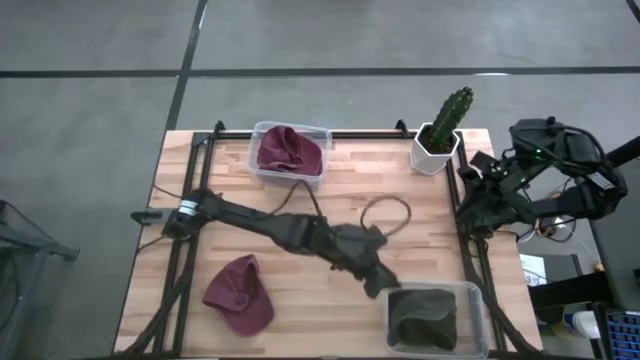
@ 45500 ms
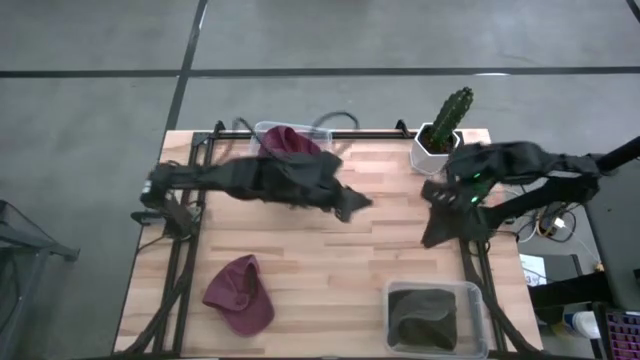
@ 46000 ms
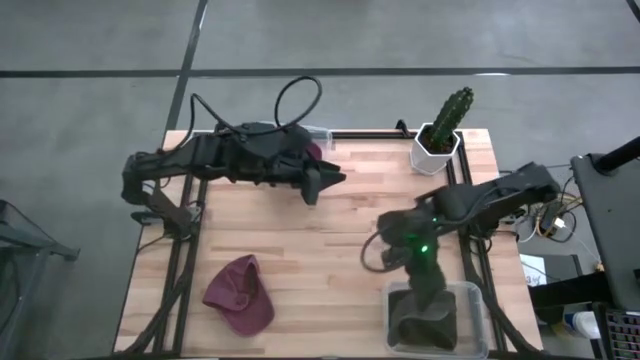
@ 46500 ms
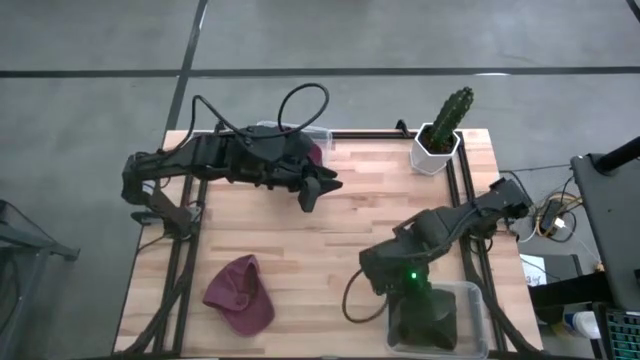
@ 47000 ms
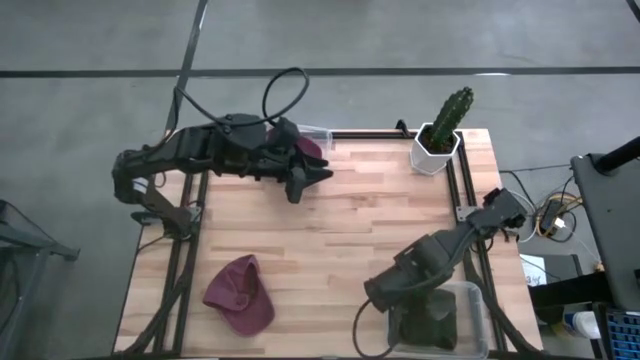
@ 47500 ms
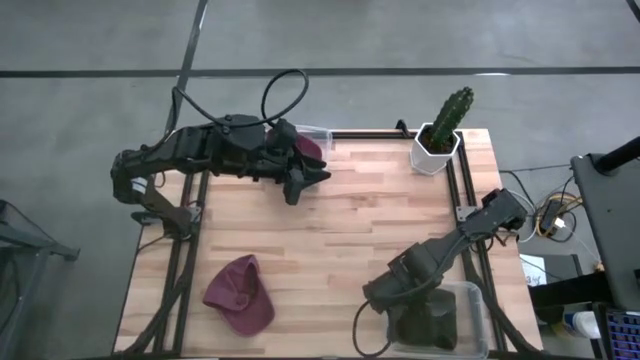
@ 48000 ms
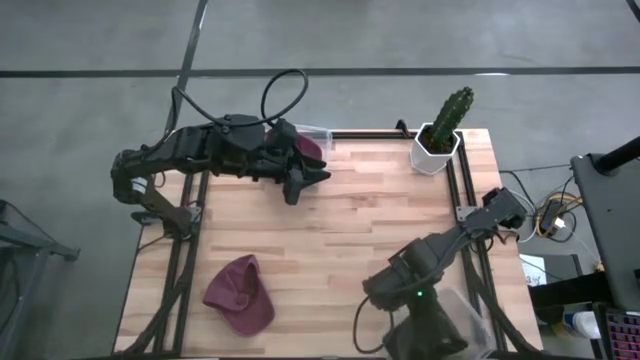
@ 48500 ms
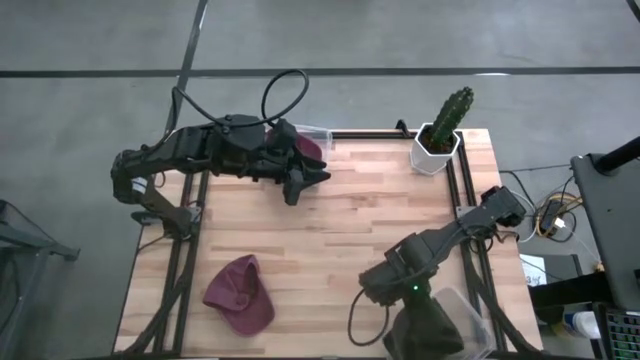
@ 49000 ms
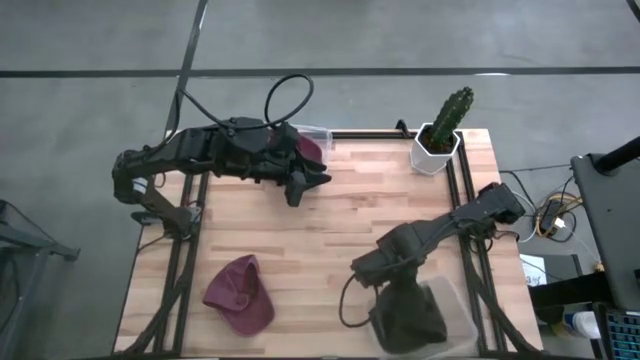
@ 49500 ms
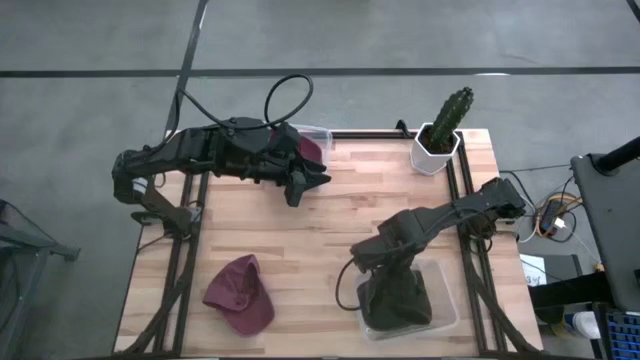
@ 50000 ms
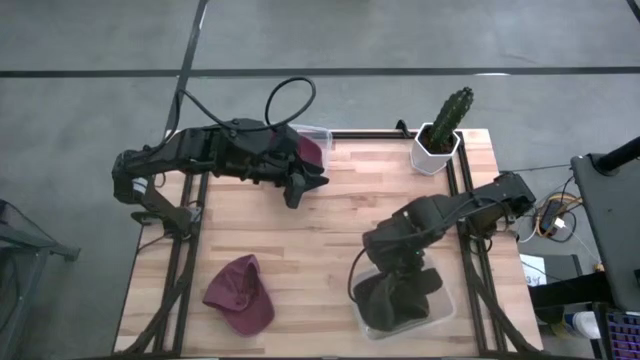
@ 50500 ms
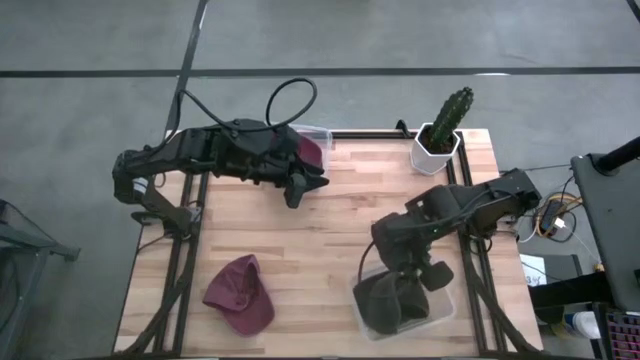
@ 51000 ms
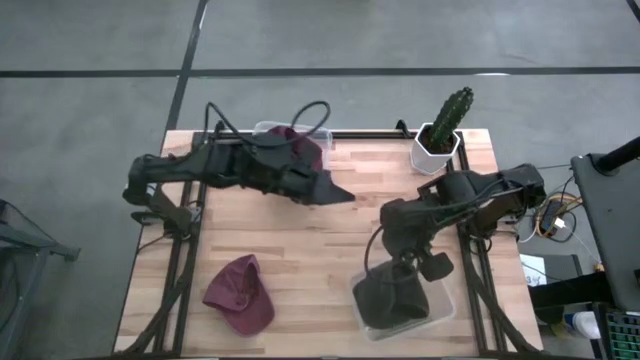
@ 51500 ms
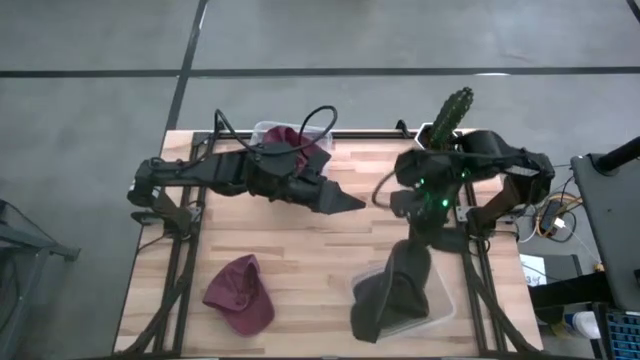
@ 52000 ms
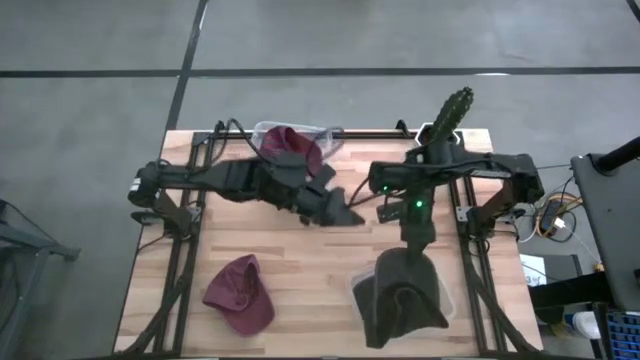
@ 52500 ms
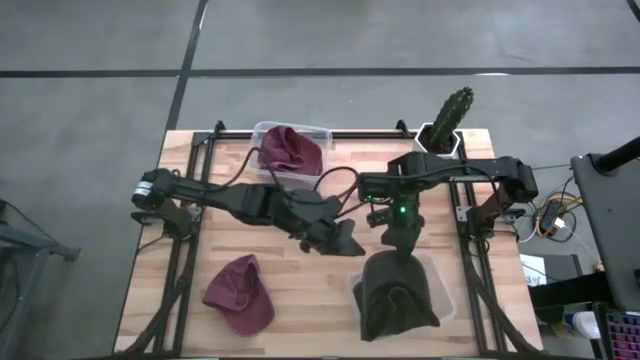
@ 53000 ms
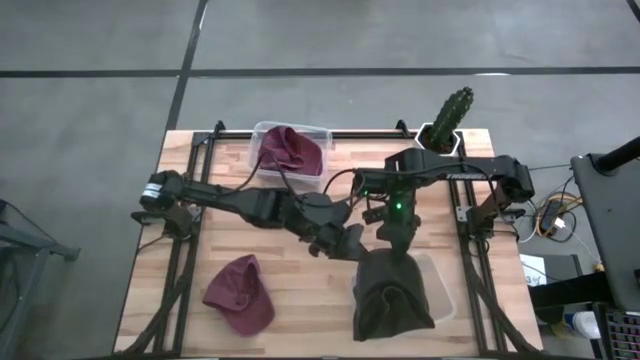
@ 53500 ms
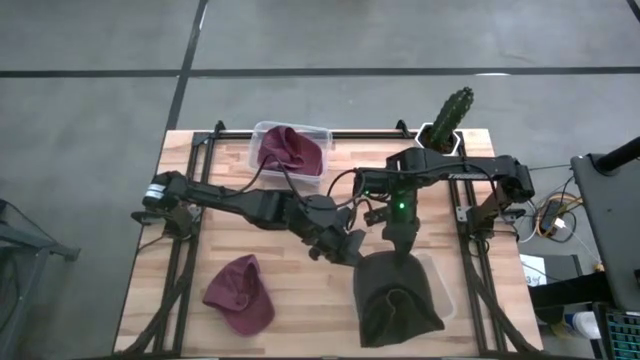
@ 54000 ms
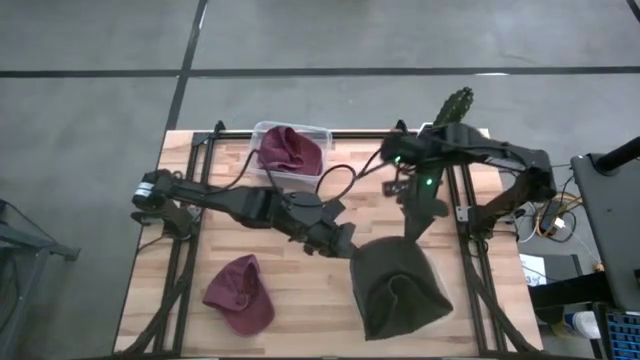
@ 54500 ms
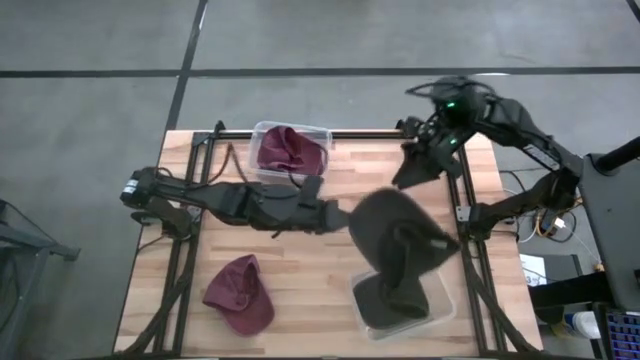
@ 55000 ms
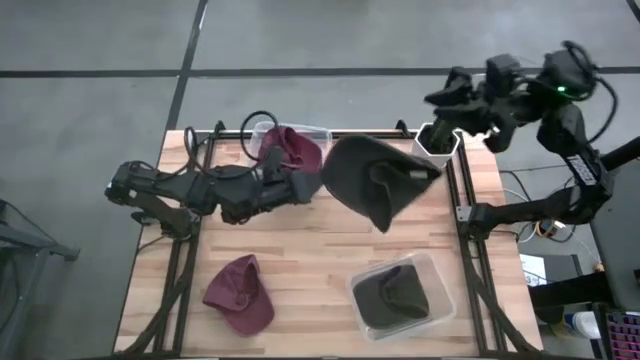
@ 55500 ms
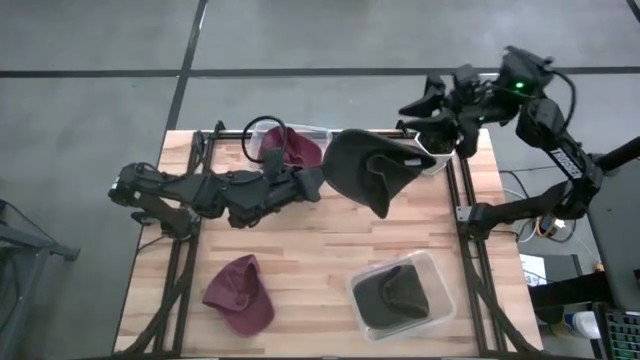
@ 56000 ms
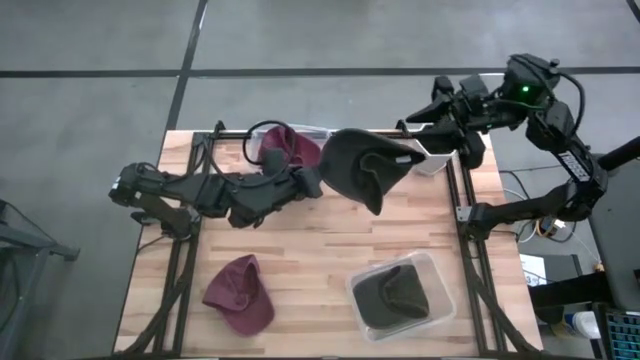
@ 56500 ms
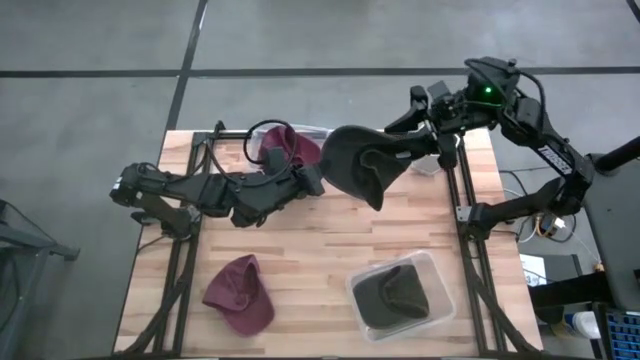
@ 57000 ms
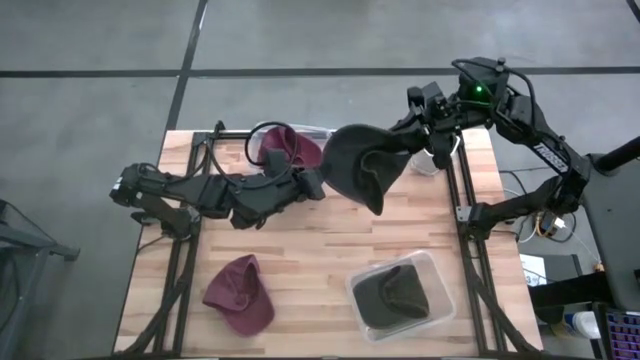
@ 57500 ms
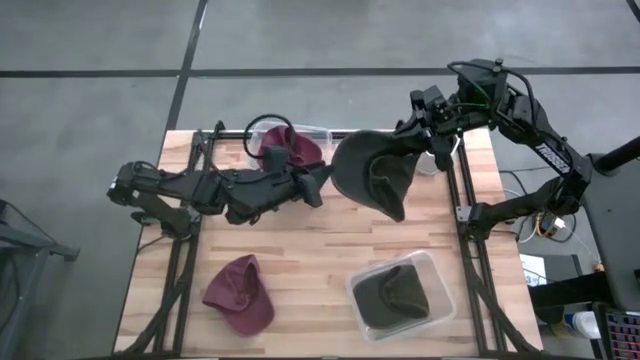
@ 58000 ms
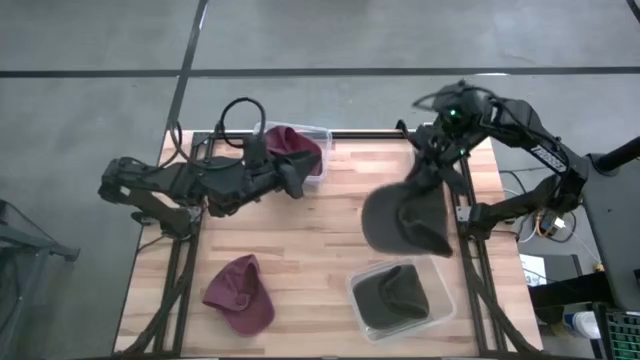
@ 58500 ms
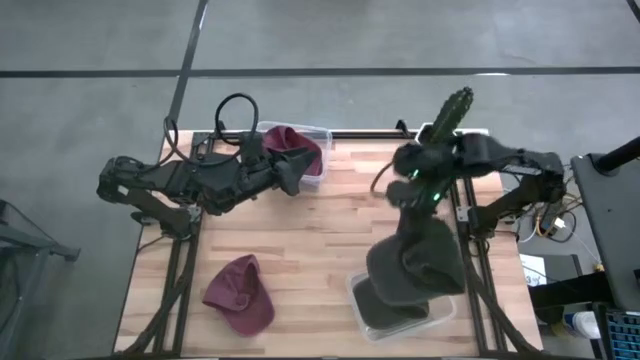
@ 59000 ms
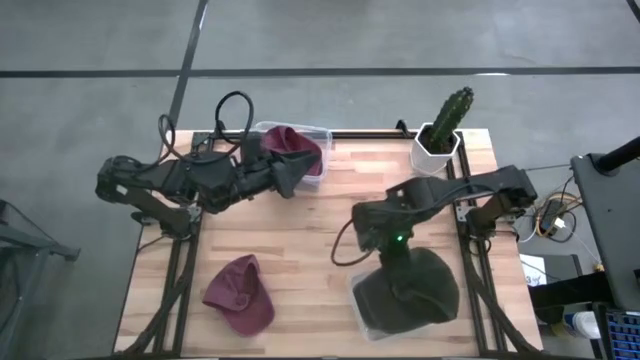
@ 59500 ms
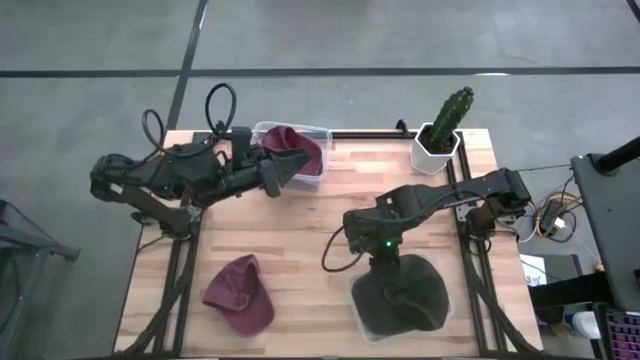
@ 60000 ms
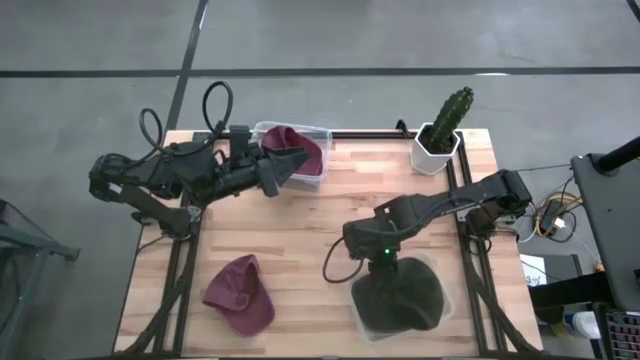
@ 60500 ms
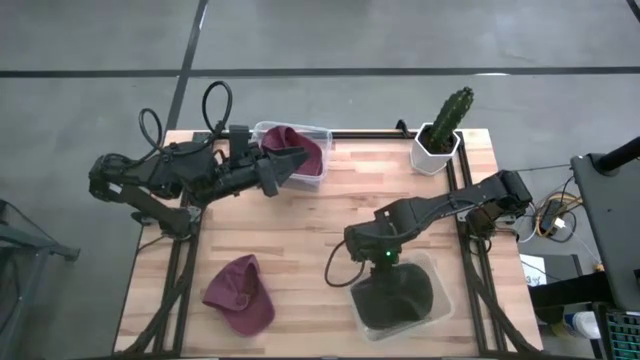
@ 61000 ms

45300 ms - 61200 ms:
Task: Pick and place caps into container
Put the black cap into the bottom transparent container

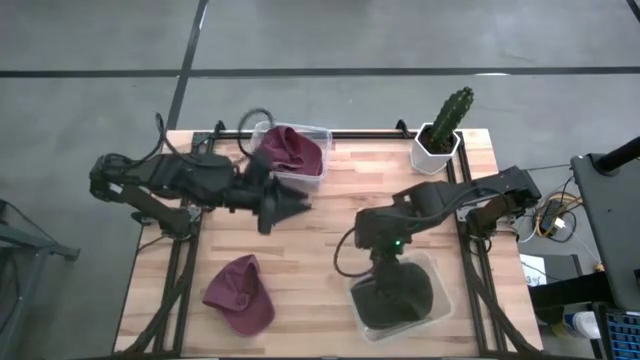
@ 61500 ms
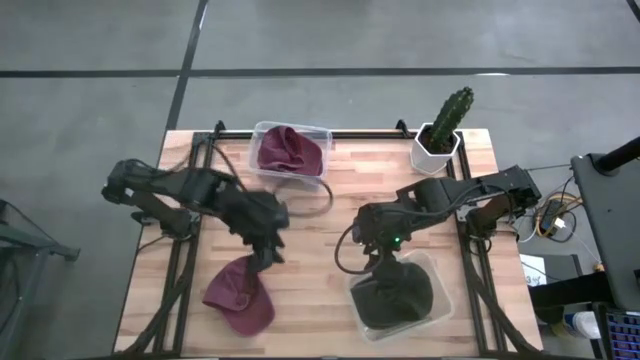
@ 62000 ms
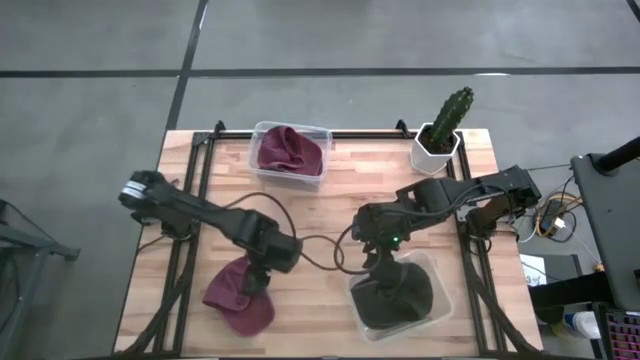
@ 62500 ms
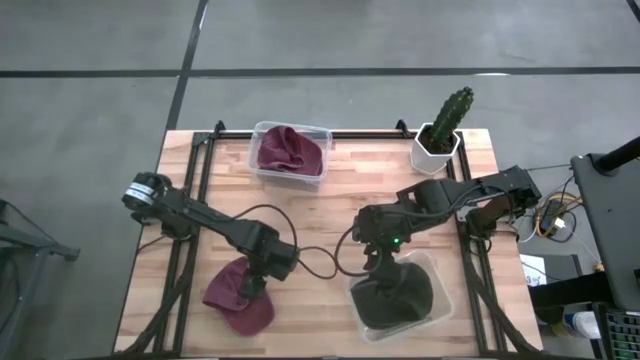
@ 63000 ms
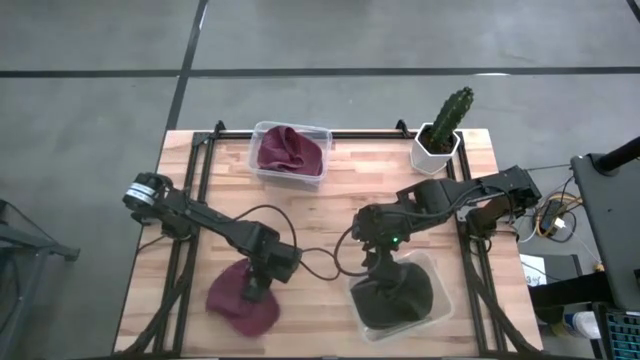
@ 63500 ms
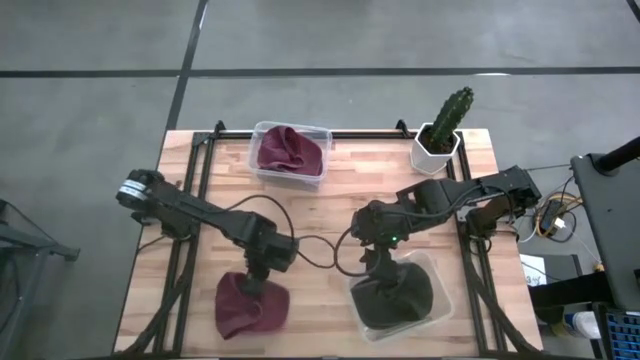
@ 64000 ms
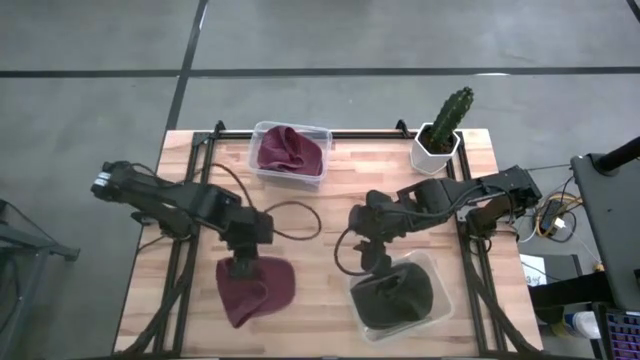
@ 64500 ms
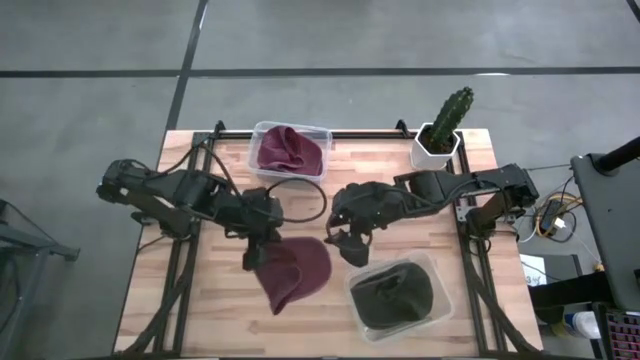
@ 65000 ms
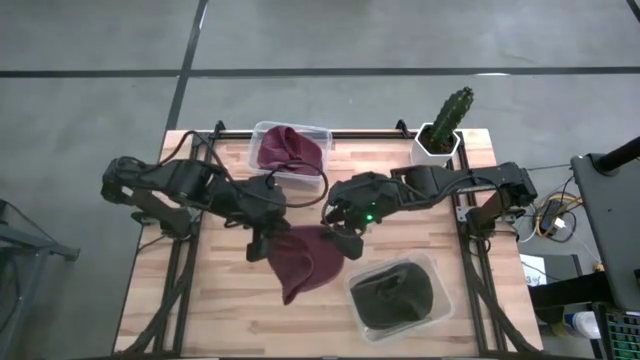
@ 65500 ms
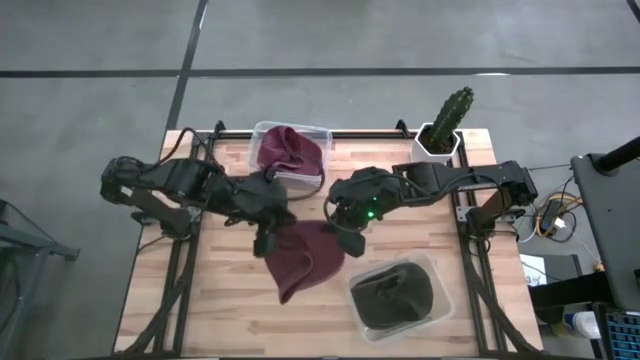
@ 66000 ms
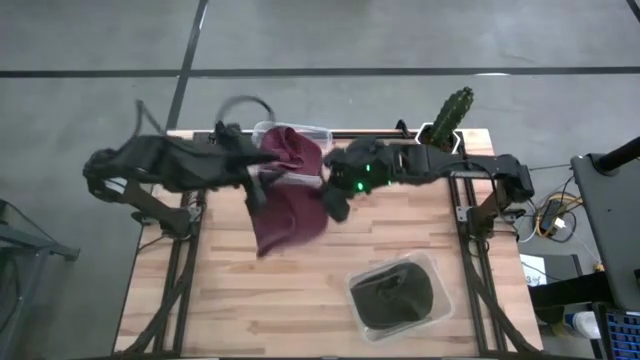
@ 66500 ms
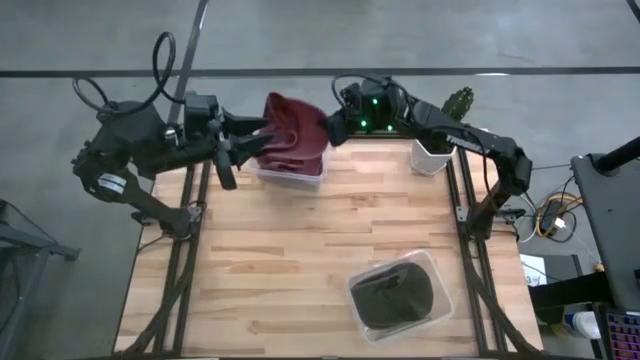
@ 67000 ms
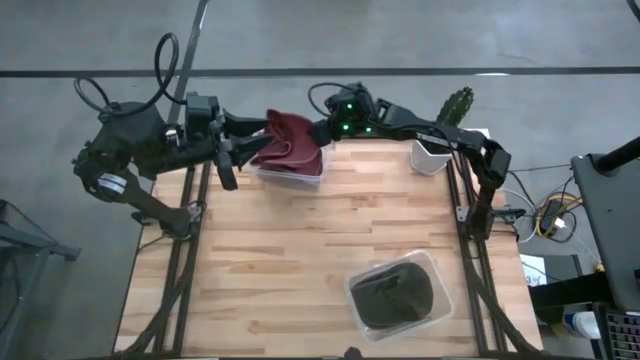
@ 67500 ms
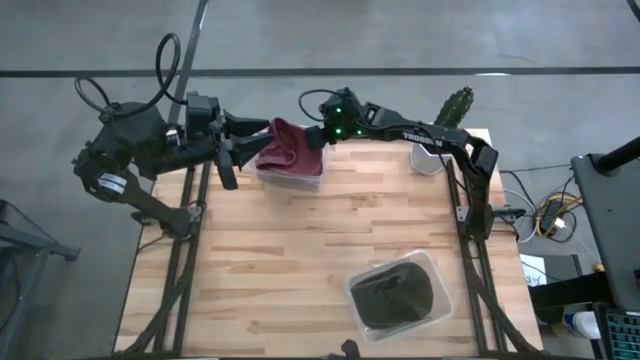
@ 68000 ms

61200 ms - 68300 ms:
Put the red cap into the top transparent container
